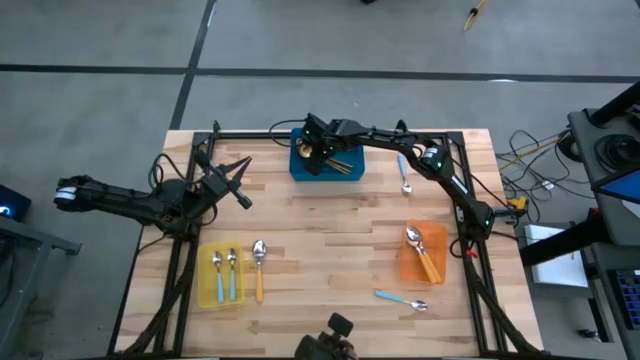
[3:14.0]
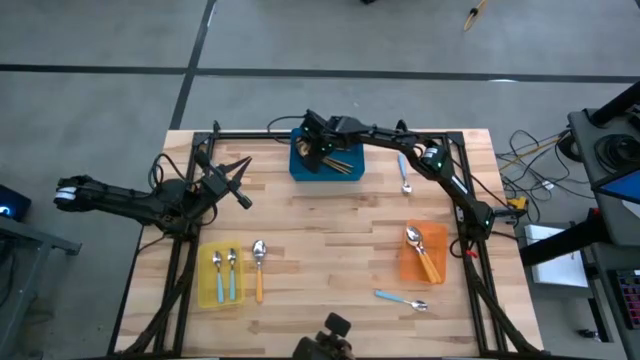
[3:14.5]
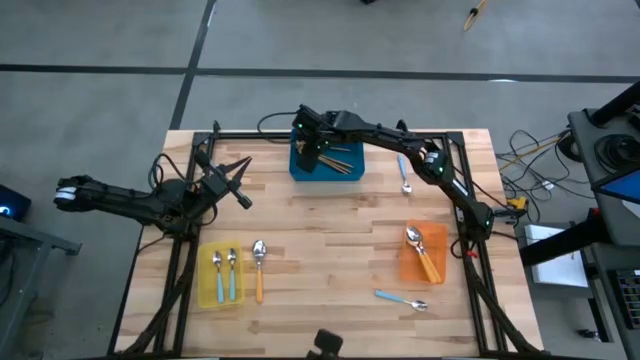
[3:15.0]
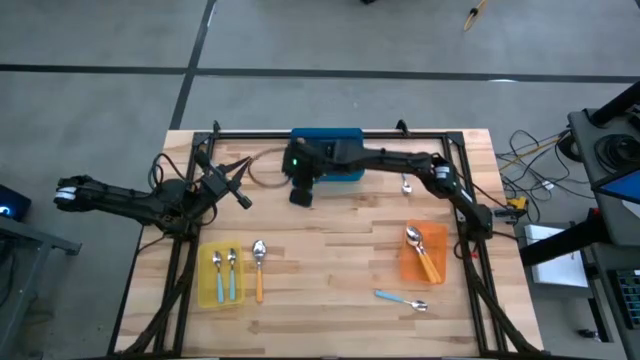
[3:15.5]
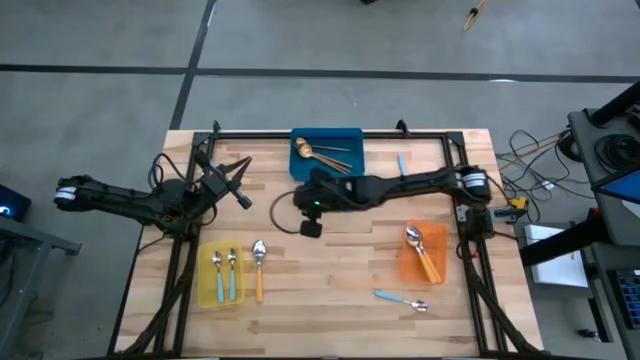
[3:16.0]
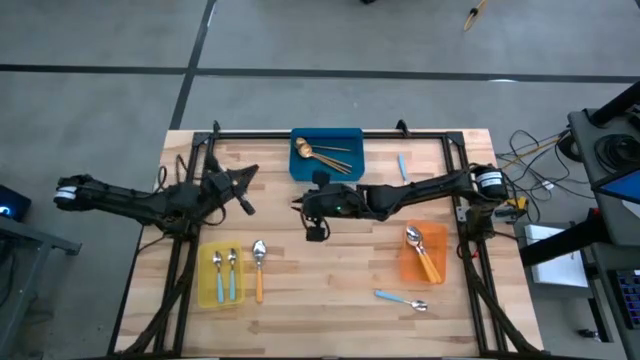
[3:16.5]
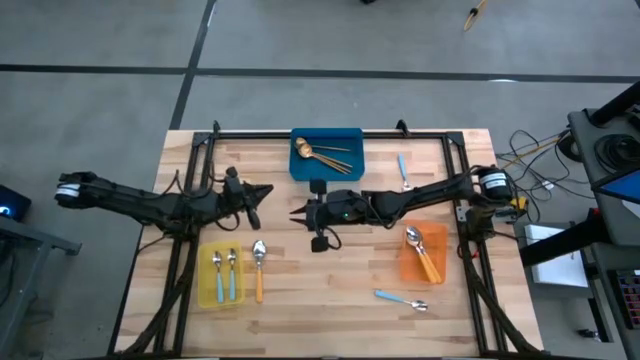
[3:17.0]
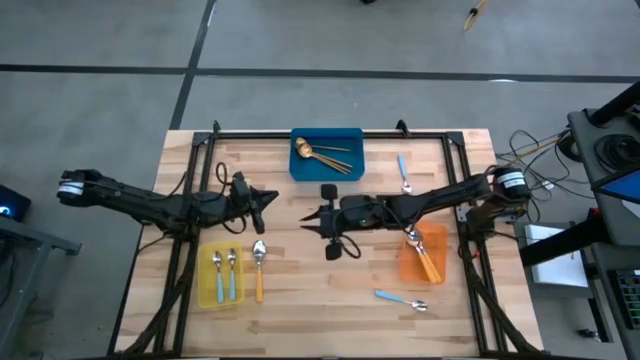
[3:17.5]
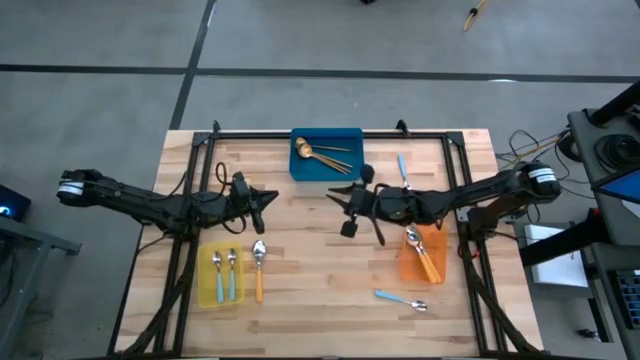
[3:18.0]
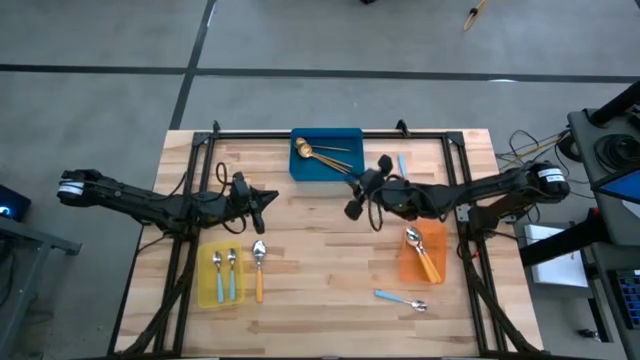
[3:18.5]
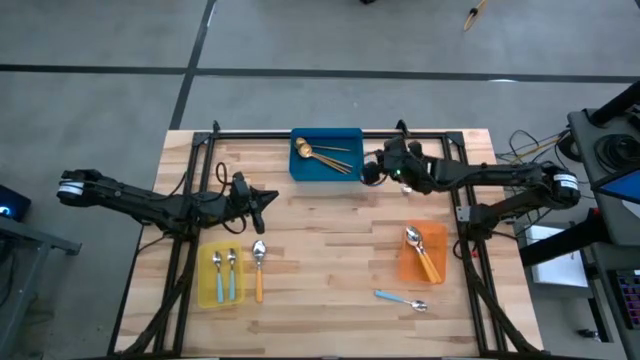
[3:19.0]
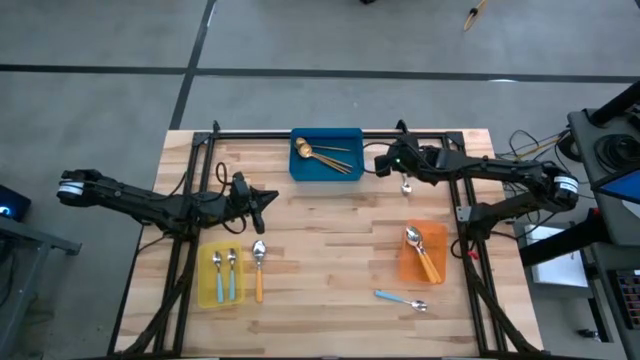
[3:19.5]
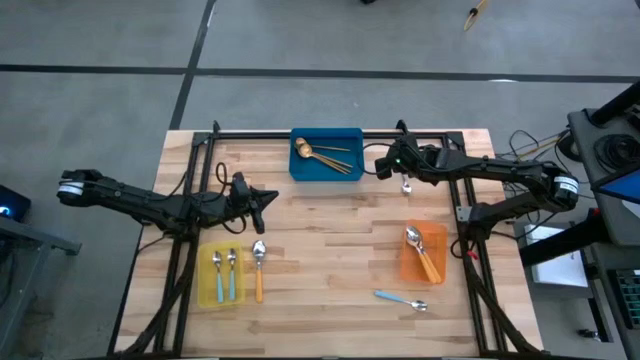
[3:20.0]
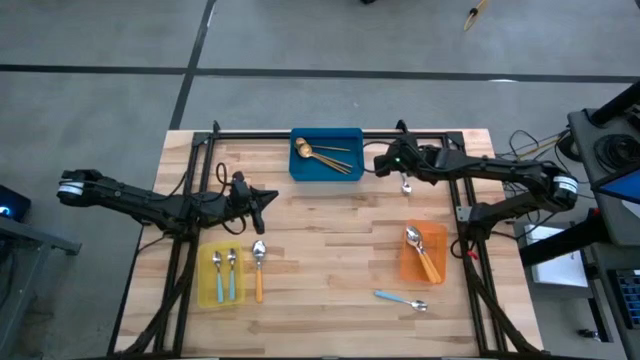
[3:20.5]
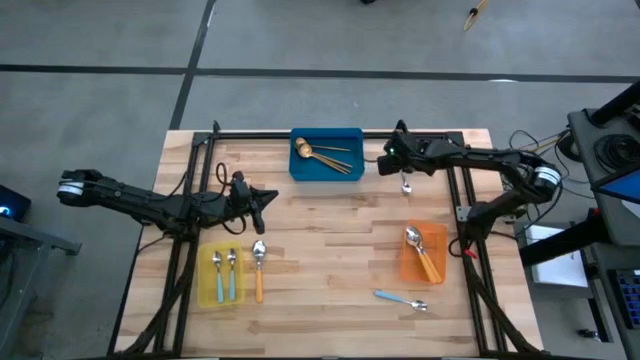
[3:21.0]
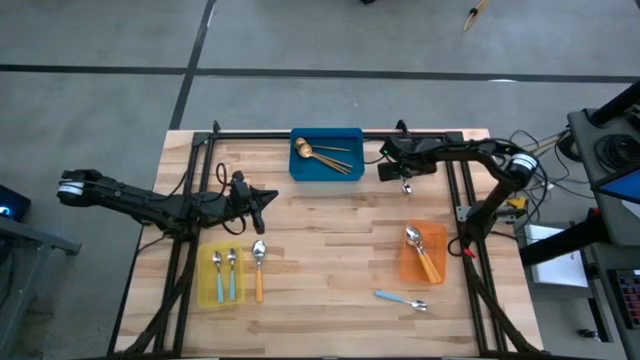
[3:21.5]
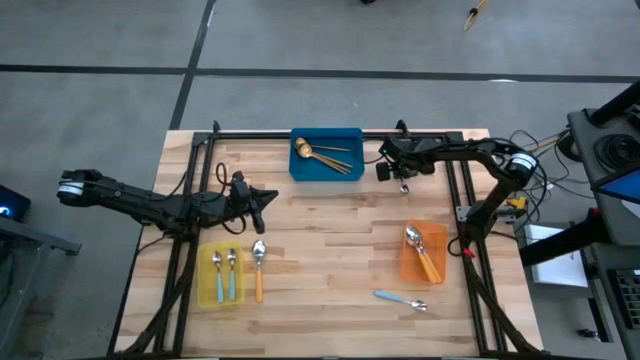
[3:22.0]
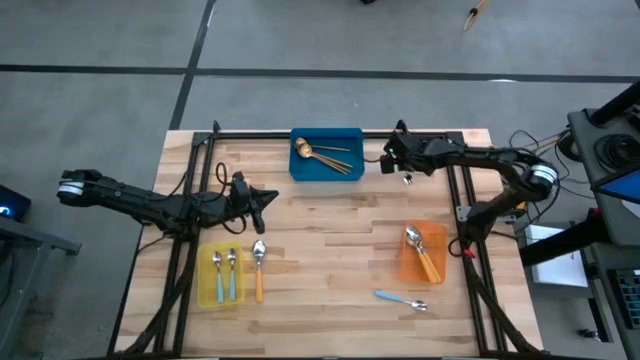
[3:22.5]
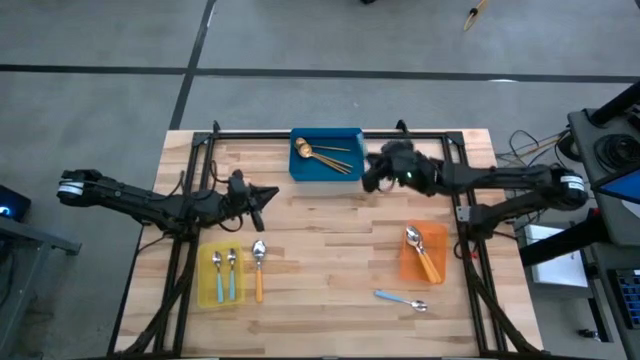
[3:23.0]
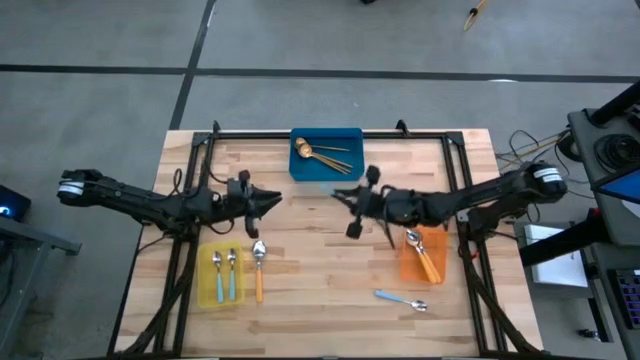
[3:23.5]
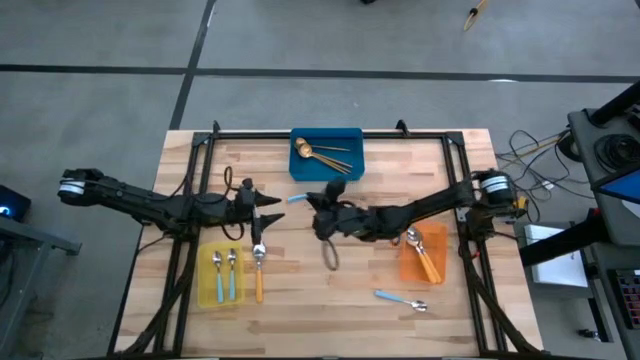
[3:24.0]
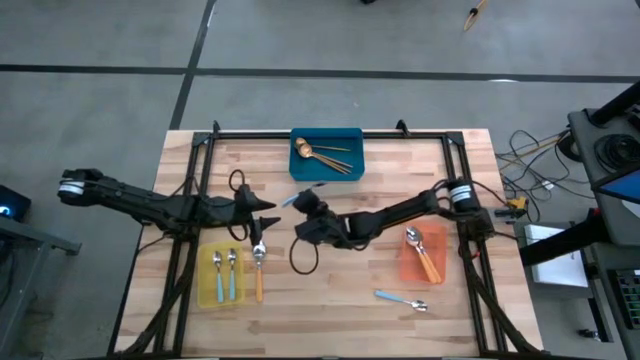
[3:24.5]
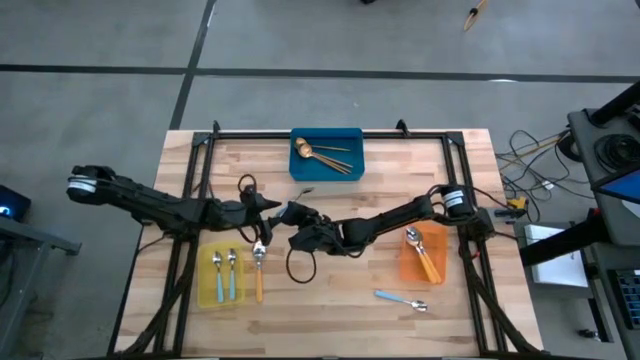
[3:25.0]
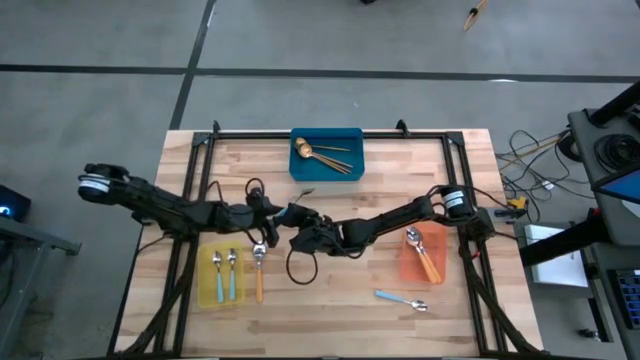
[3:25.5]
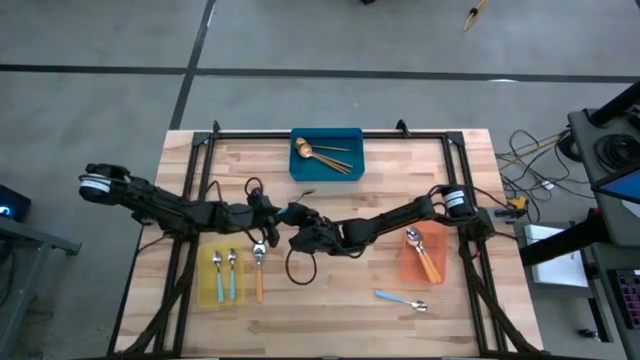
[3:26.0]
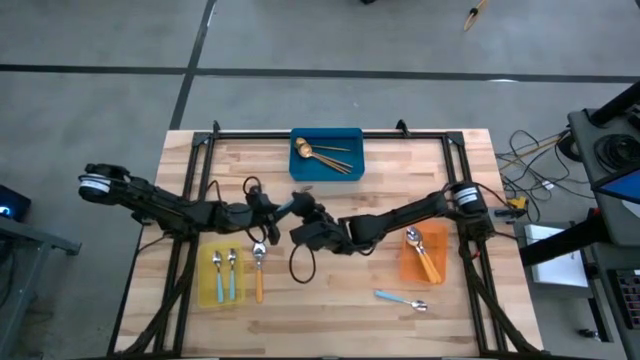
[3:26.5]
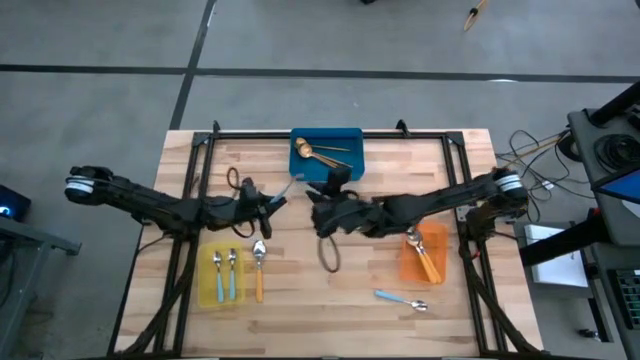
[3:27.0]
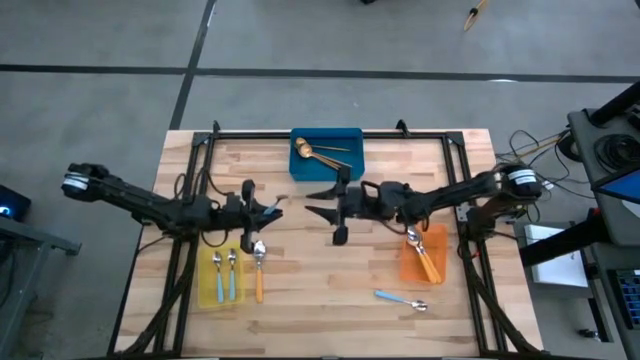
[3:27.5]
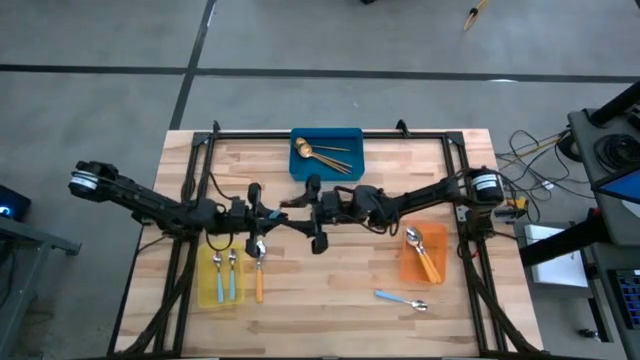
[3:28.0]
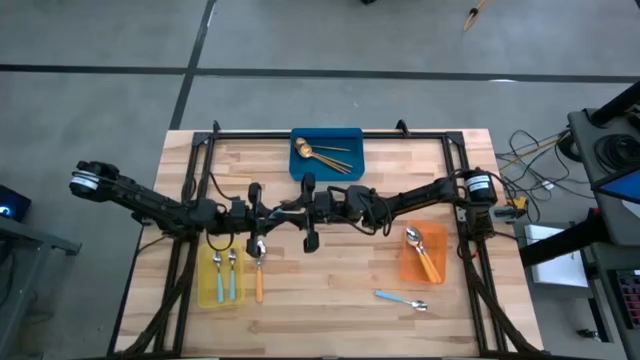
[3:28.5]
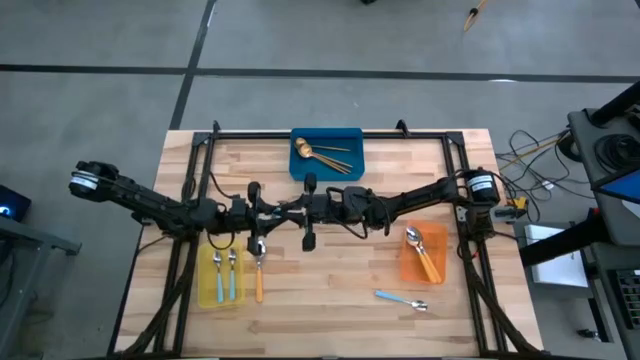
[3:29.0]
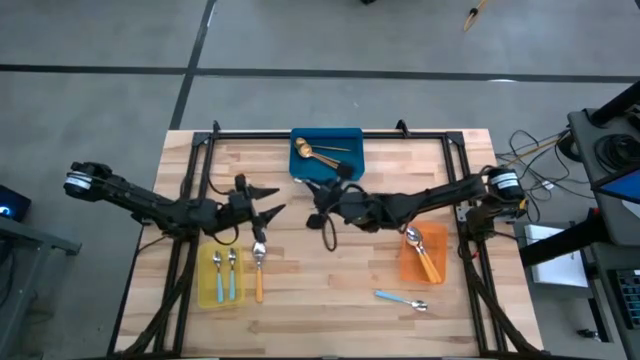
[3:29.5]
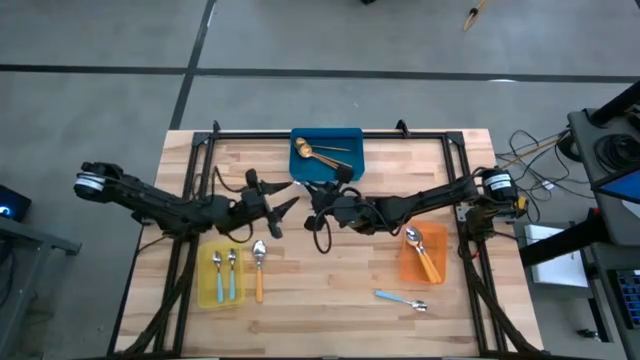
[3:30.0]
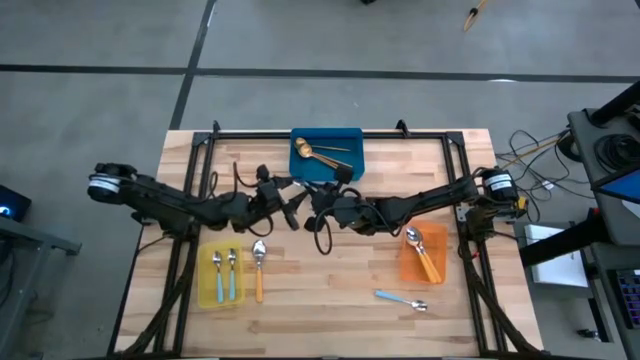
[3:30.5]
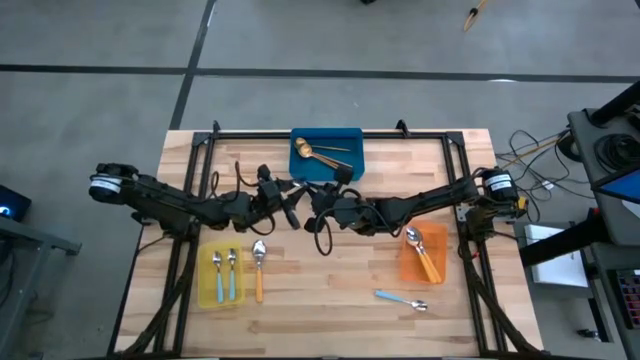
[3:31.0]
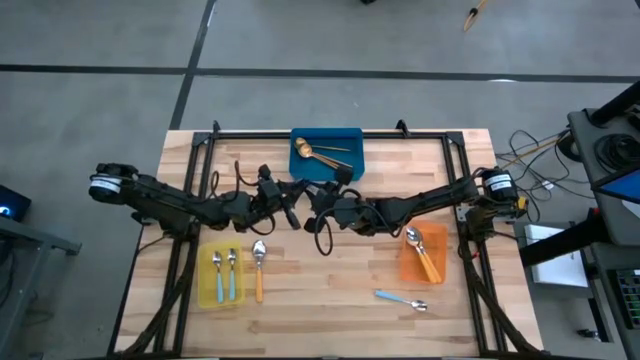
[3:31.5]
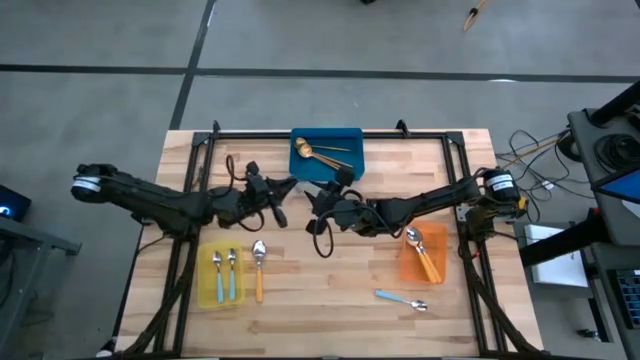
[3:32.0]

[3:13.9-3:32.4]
Task: Sort silverware by color (type)
Put the blue spoon into the yellow bin

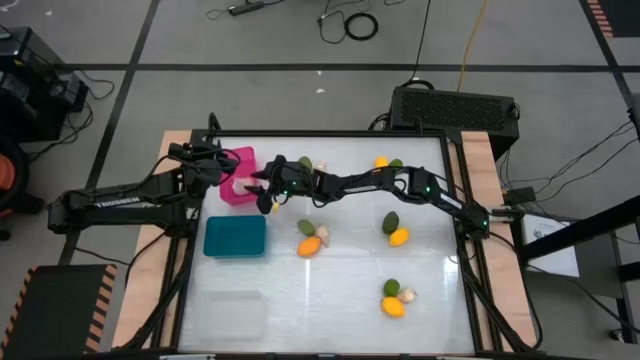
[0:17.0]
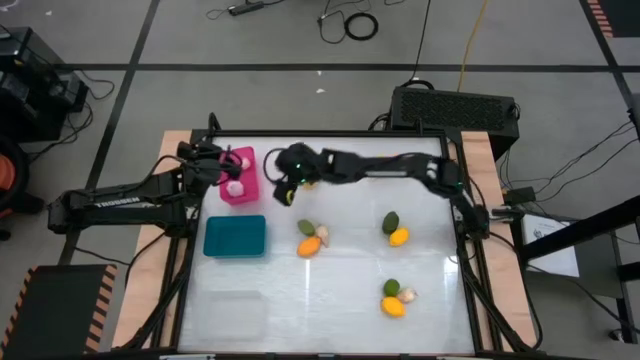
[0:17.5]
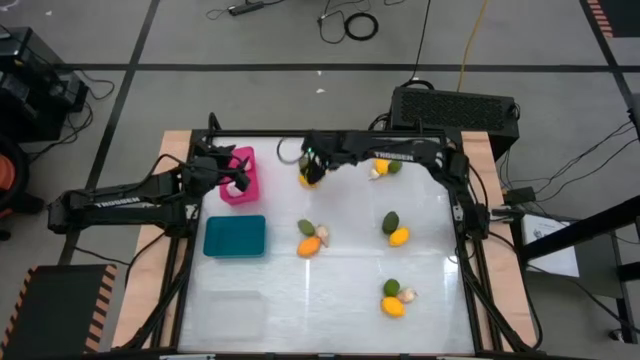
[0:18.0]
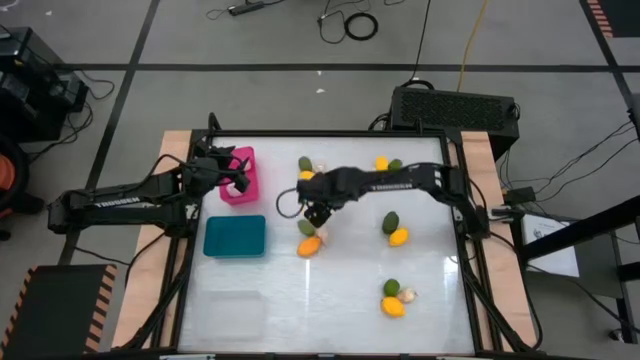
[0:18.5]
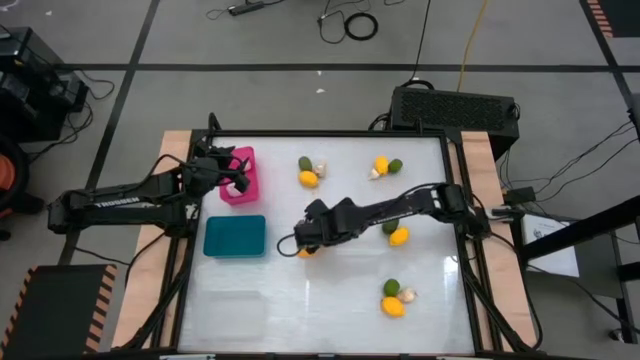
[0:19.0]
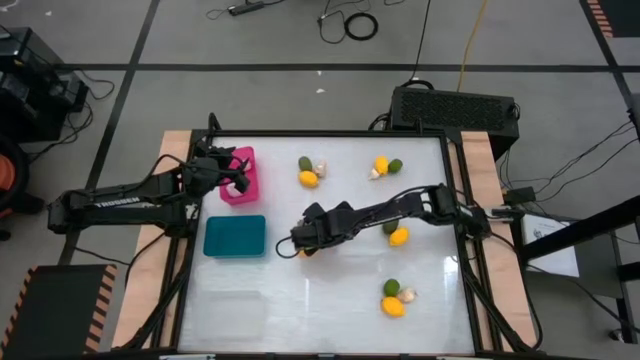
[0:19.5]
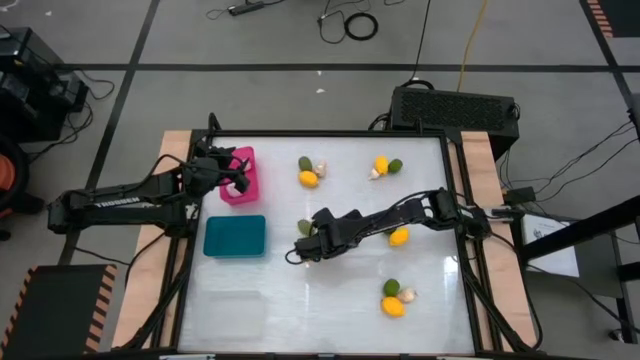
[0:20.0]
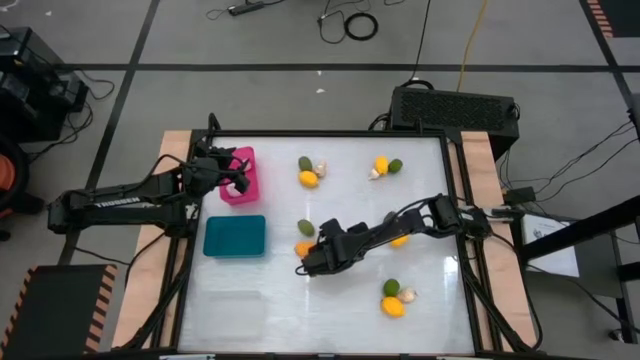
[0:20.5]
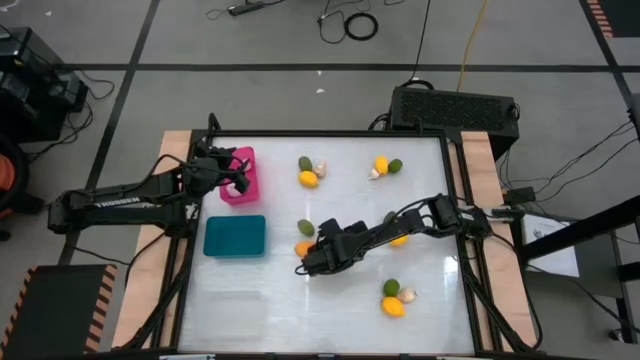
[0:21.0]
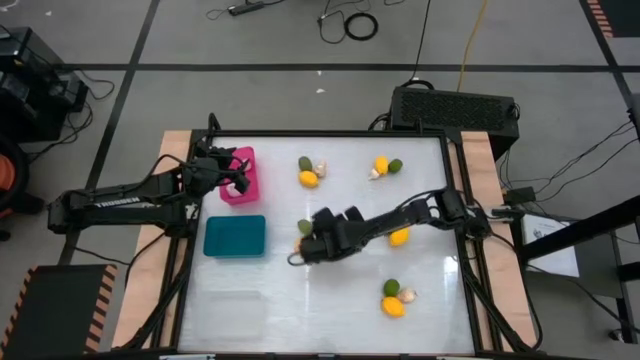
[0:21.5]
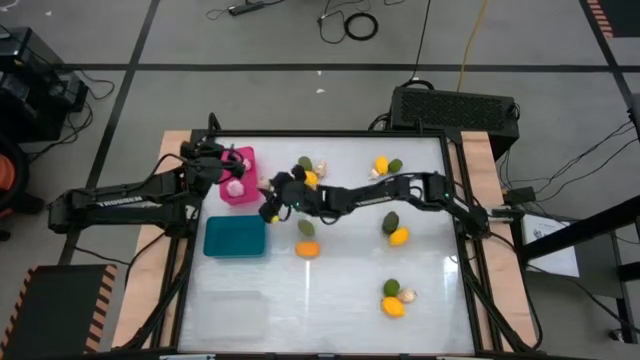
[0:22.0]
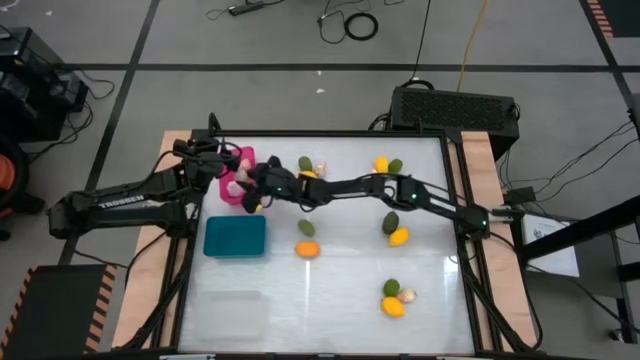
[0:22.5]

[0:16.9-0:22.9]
Task: Sort produce into baskets
Put the white garlic into the pink bin
